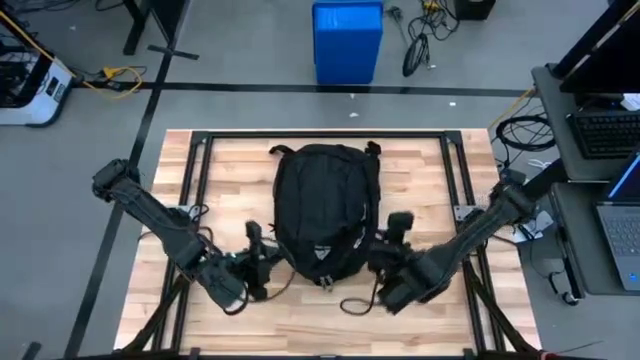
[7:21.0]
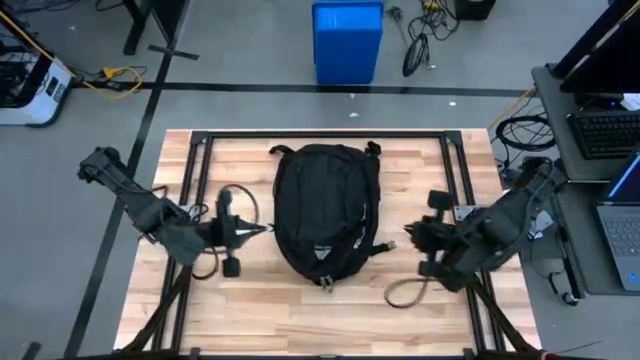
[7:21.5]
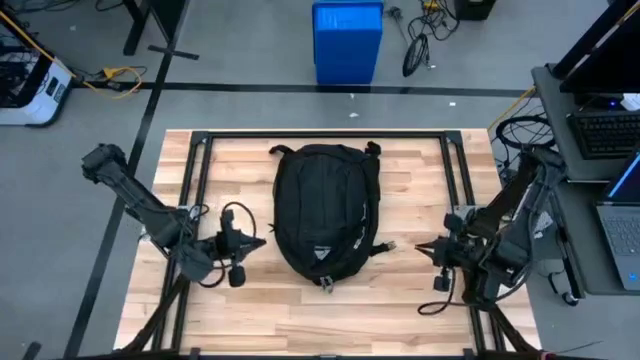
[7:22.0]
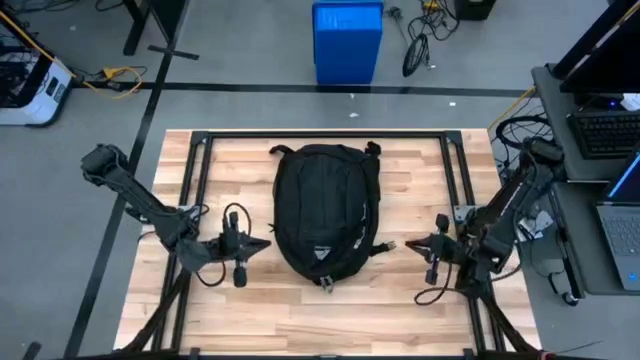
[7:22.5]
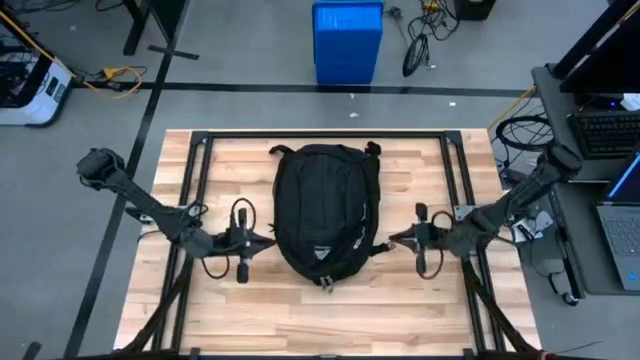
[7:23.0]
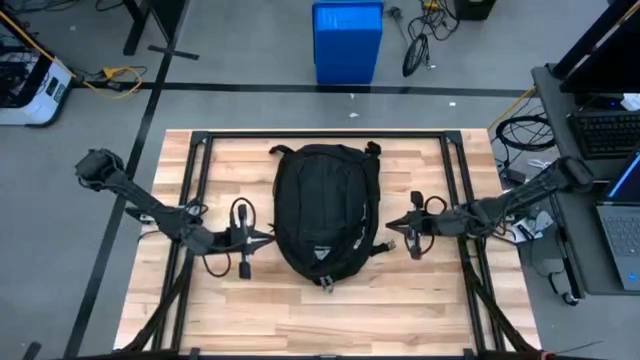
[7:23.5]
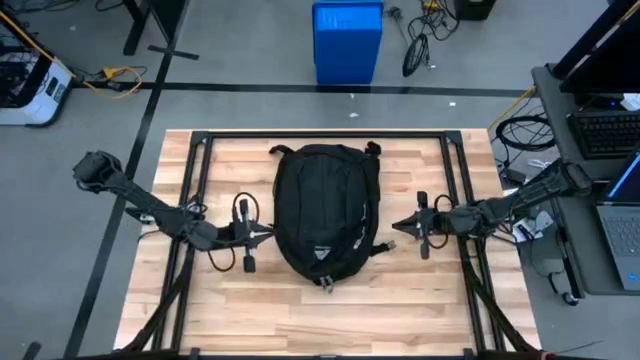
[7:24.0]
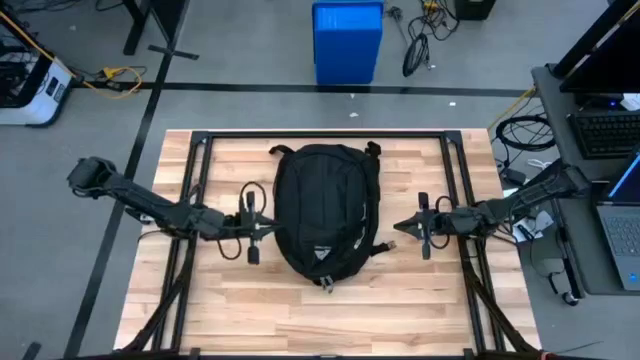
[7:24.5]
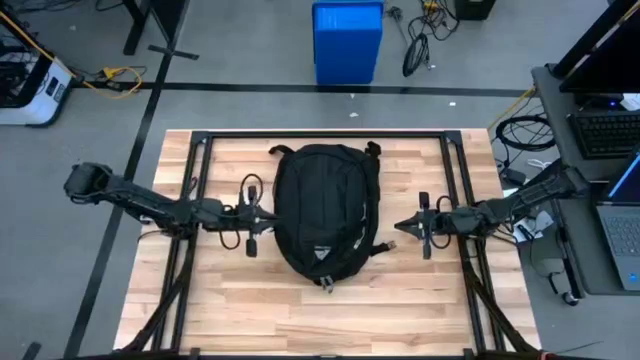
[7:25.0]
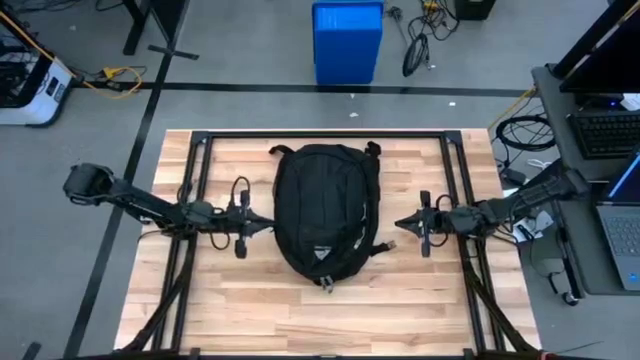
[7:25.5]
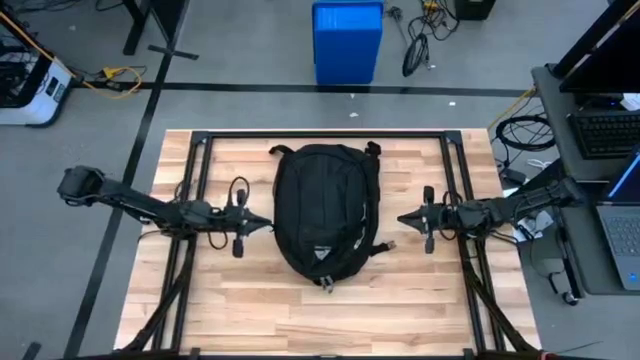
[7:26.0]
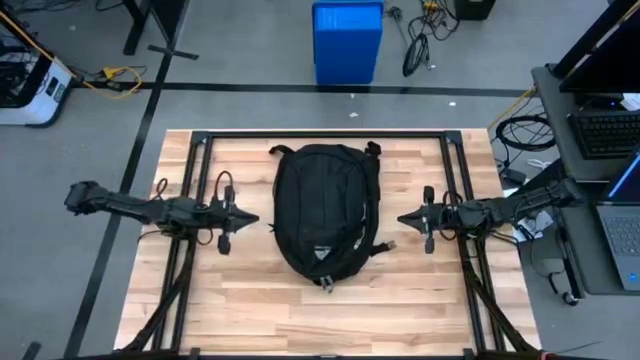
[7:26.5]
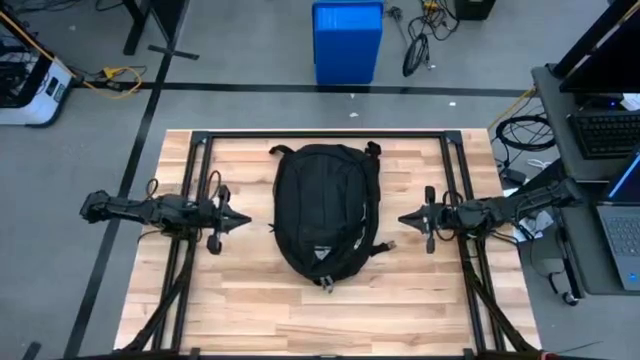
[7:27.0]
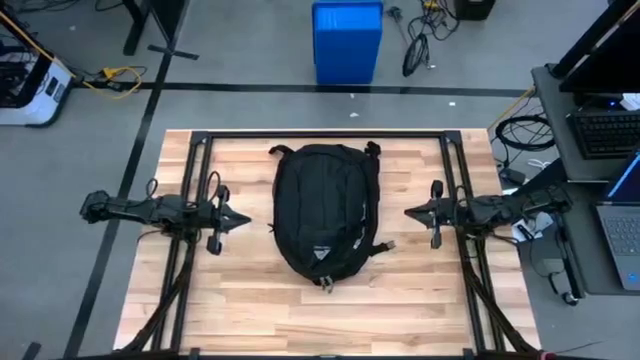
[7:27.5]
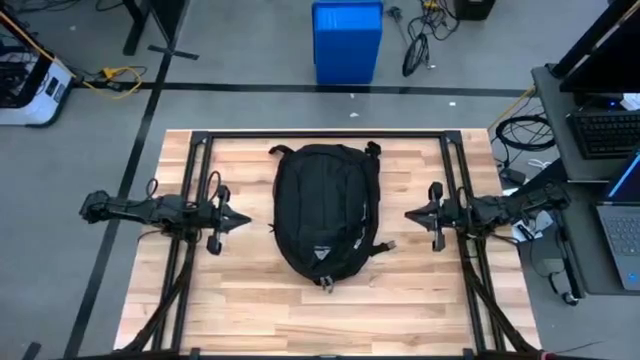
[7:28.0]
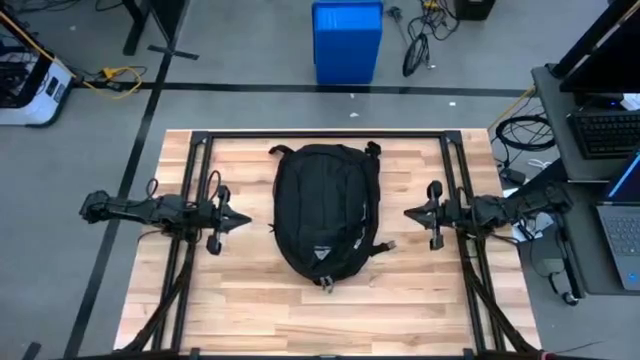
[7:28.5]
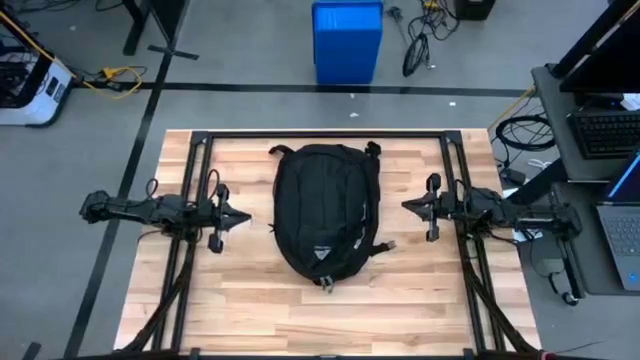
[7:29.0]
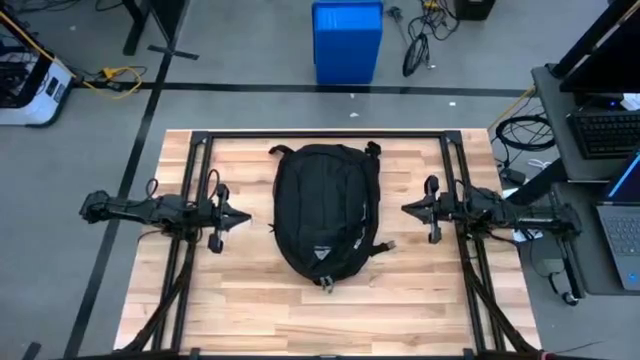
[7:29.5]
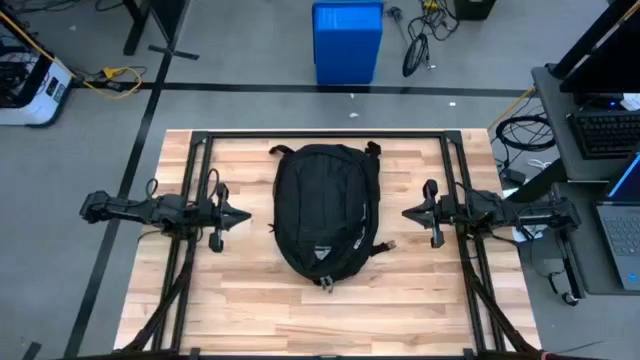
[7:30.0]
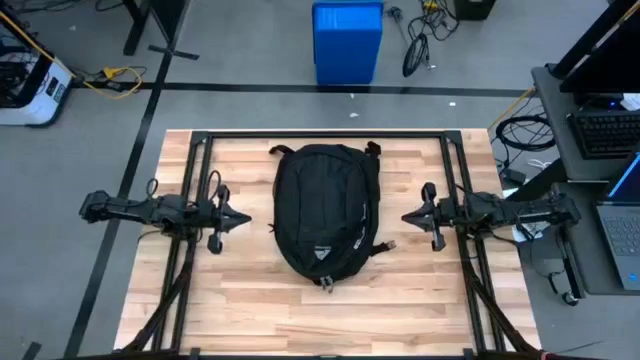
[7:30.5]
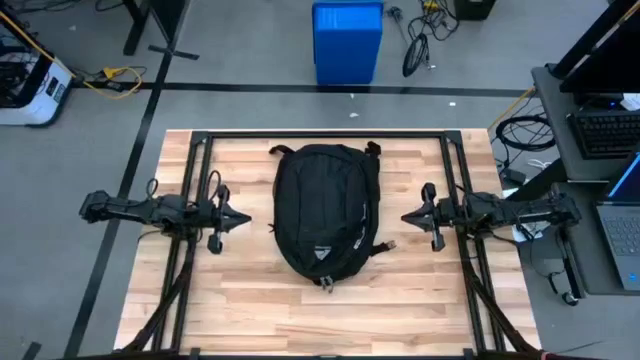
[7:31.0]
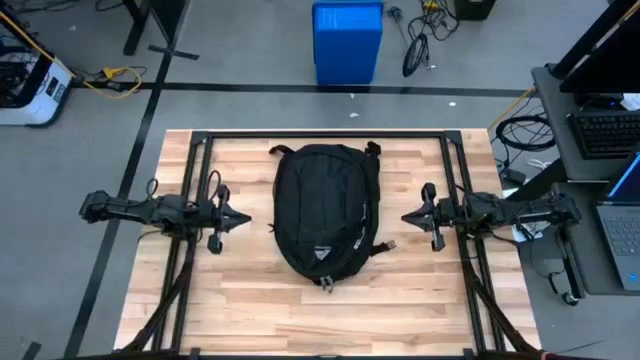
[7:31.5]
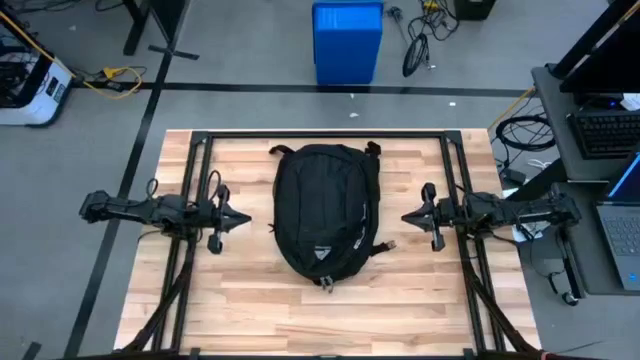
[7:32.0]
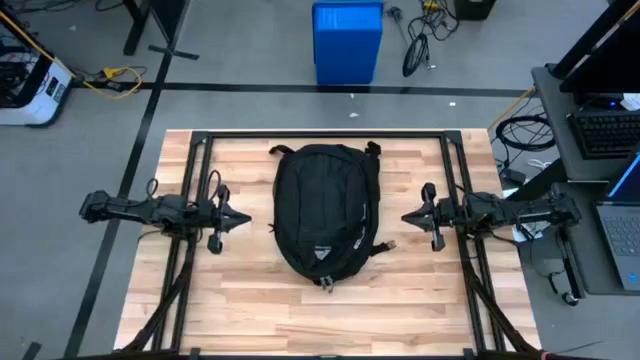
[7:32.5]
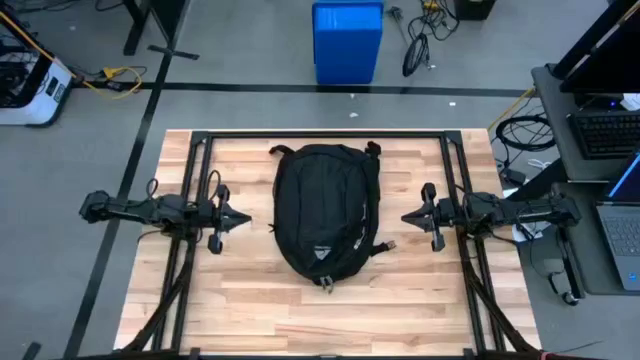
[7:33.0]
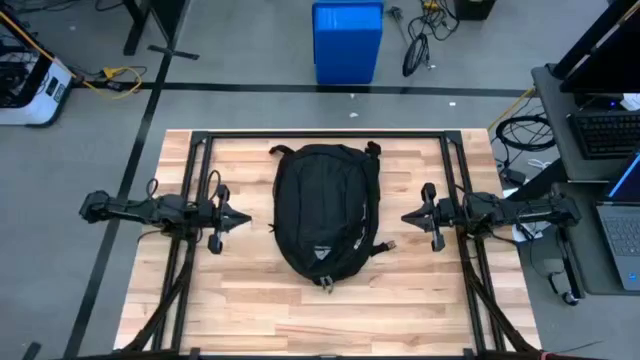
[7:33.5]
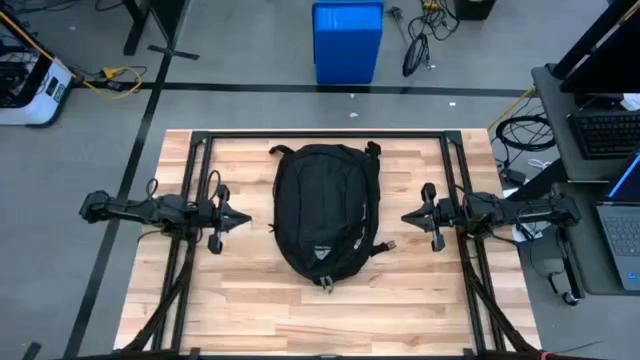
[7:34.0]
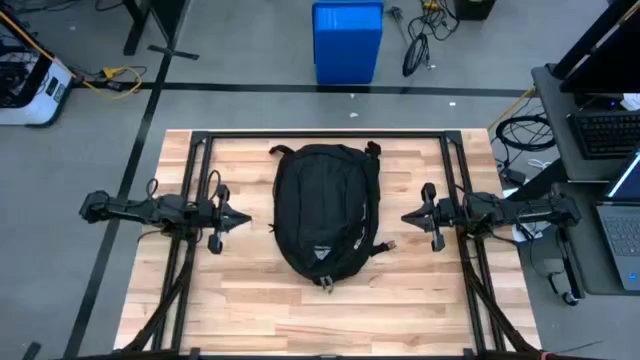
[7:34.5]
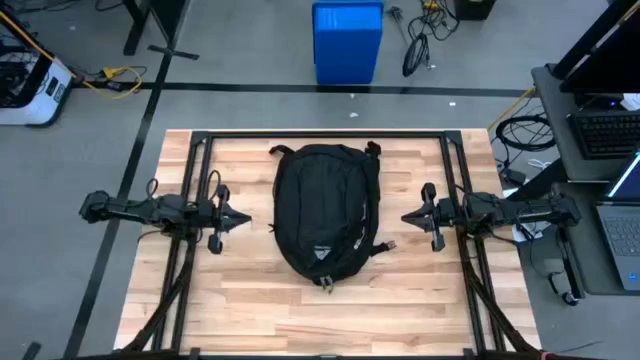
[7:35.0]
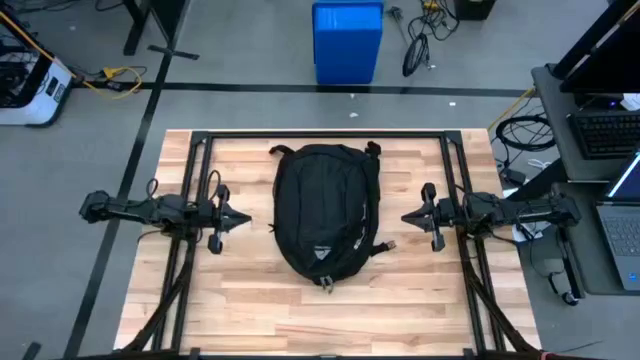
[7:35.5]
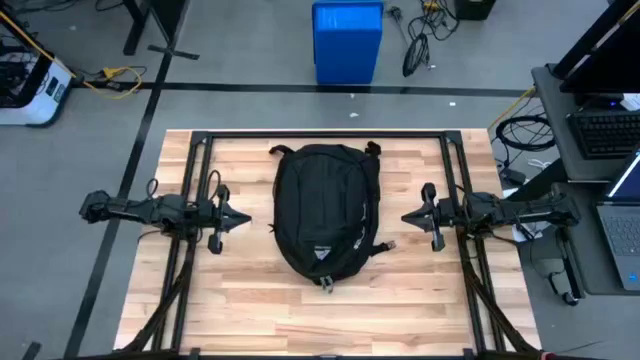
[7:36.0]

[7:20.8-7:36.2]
Task: Unpack backpack
Return to Home Position

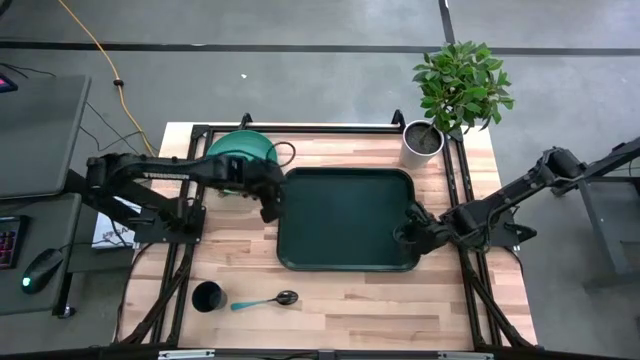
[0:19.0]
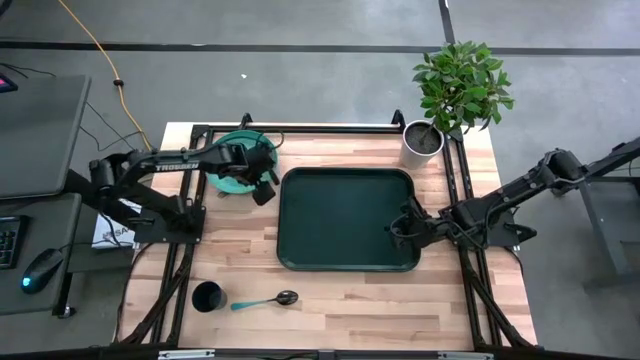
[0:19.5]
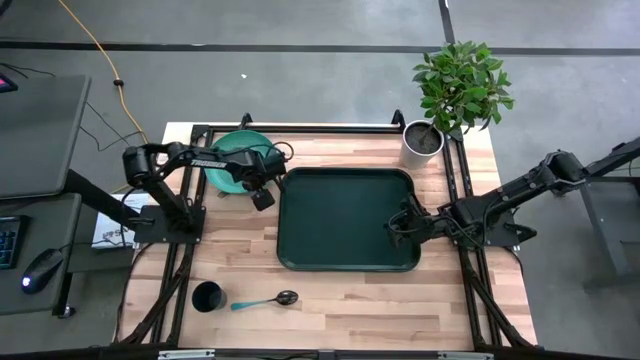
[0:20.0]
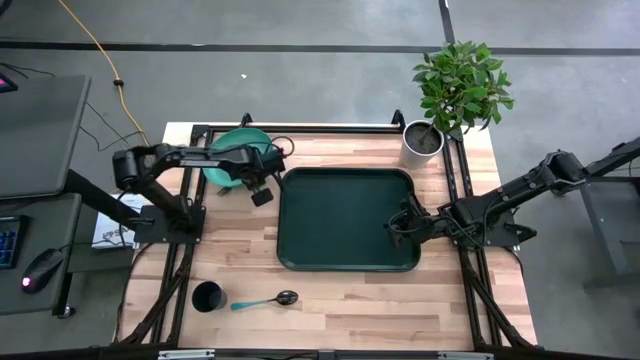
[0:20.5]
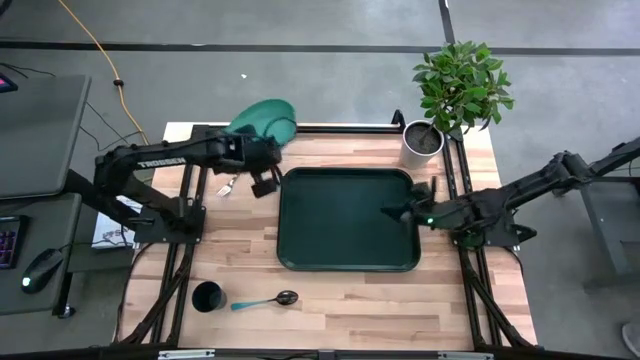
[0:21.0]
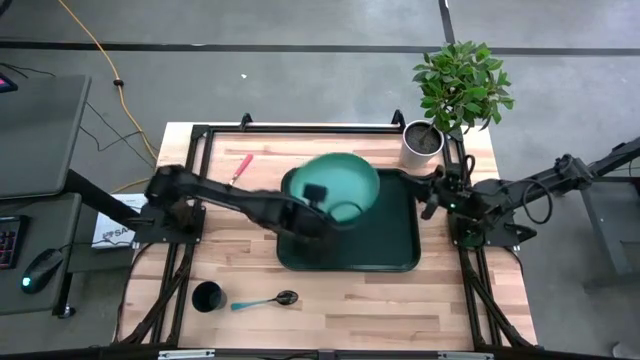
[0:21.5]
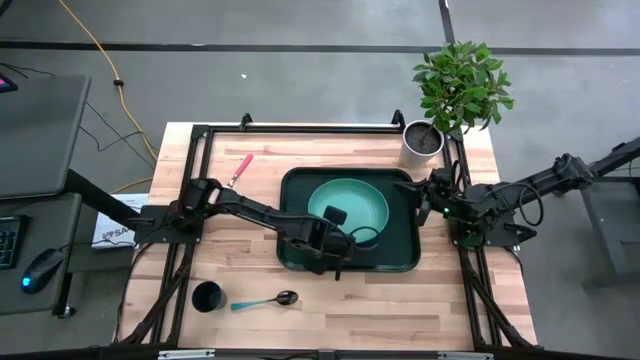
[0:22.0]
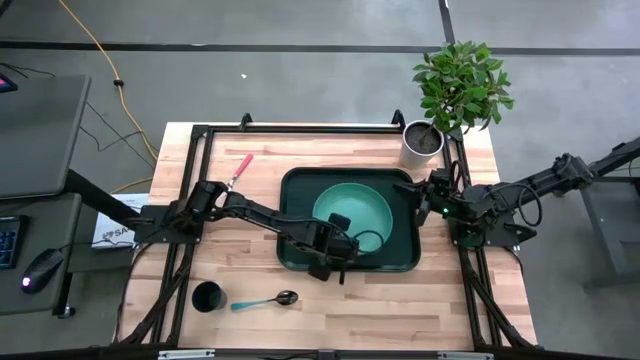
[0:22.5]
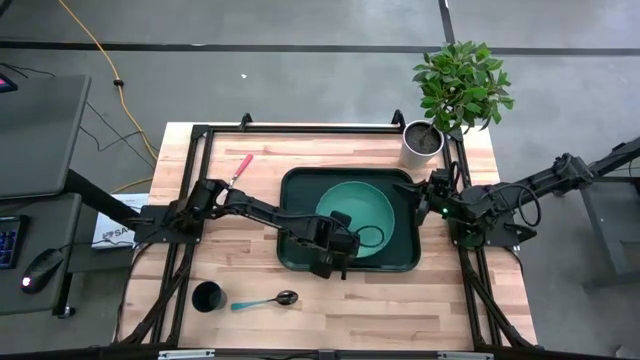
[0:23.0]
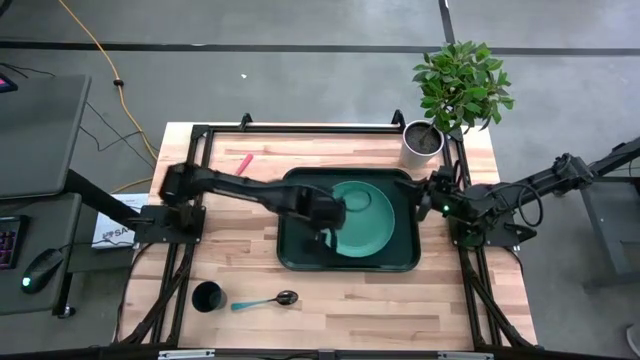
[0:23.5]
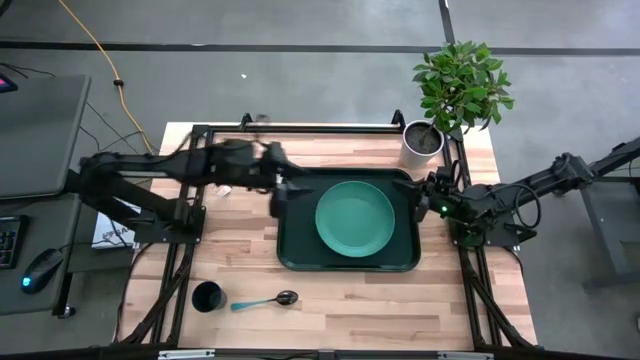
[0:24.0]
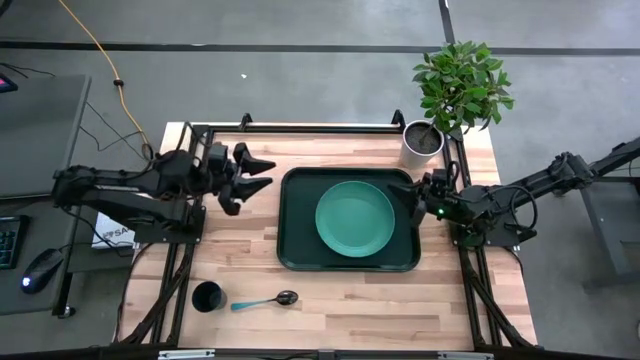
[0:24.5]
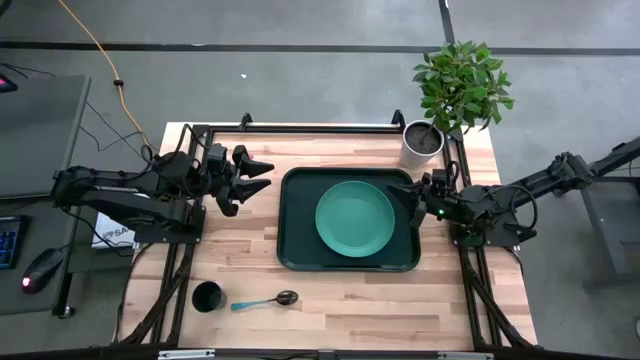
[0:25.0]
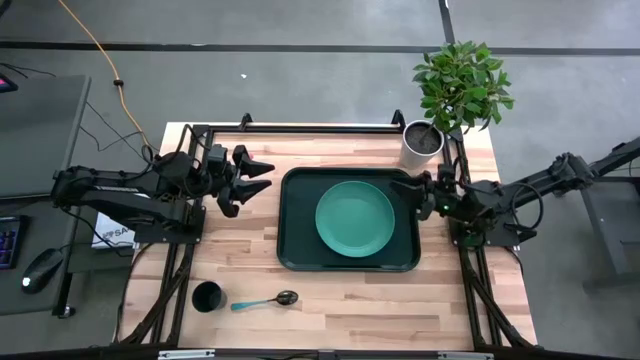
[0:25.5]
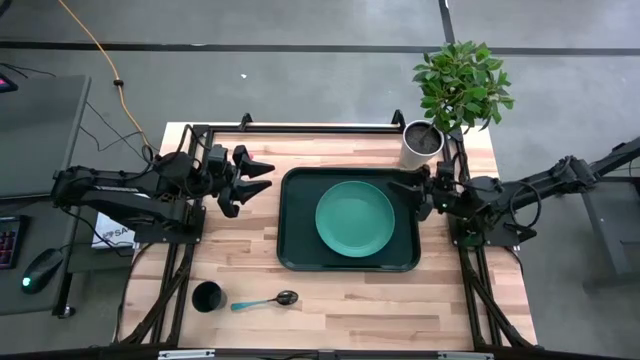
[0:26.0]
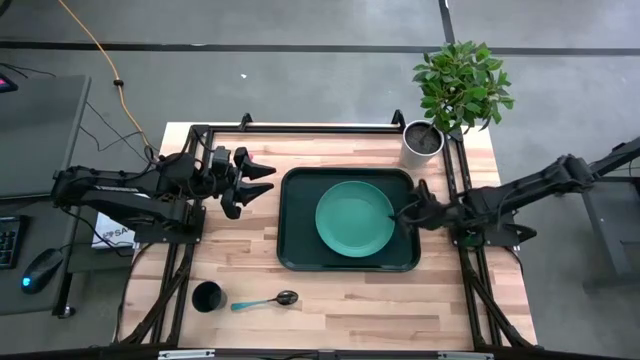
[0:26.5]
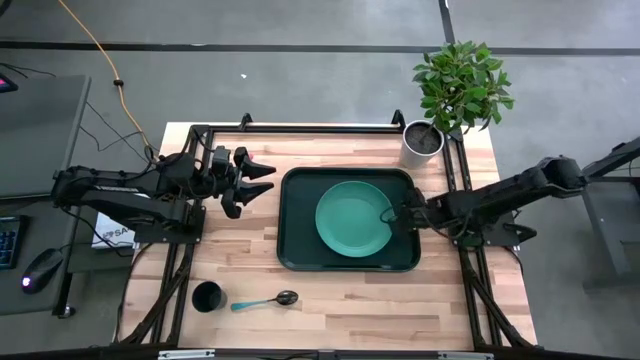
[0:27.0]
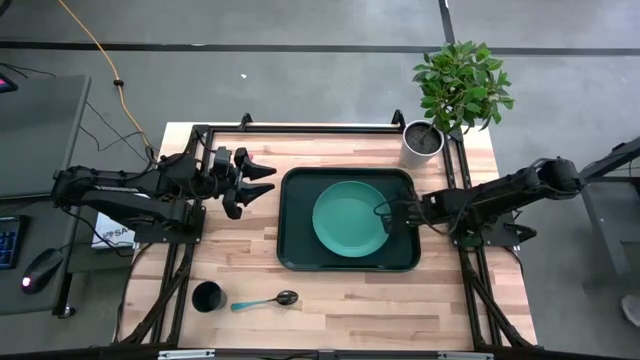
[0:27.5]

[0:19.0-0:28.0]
Task: Pick and place plate/cup/fork/spoon on tray
Put the green plate on the green serving tray
